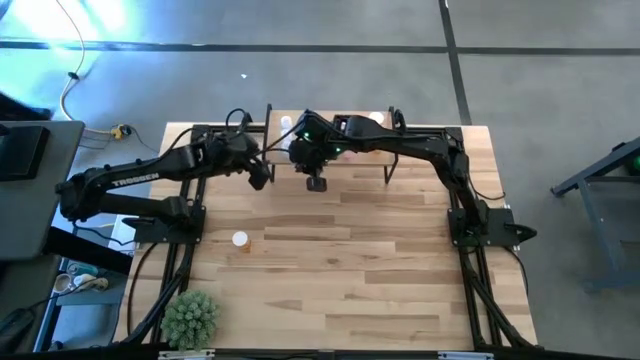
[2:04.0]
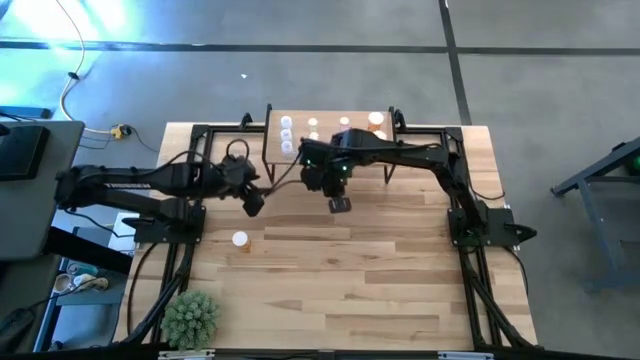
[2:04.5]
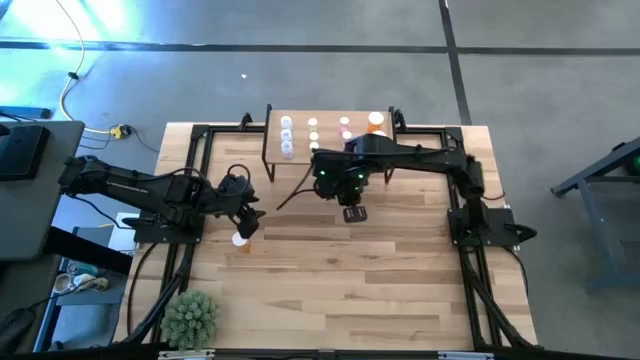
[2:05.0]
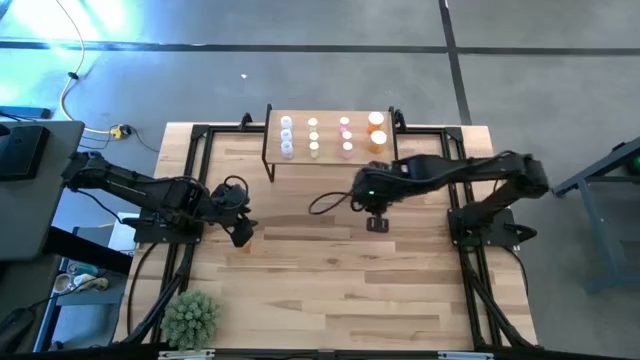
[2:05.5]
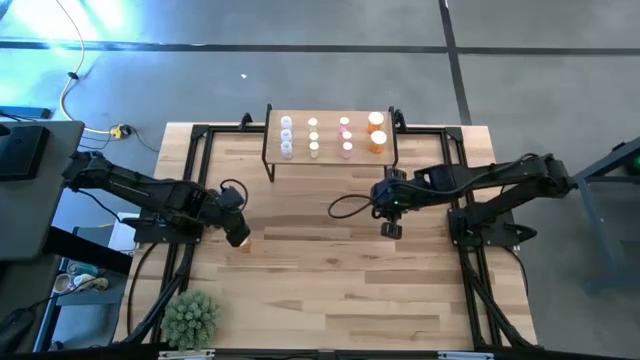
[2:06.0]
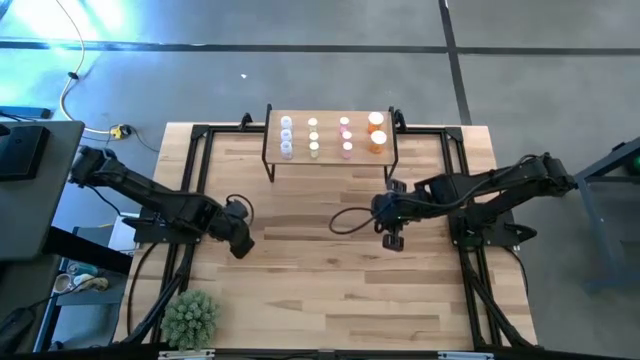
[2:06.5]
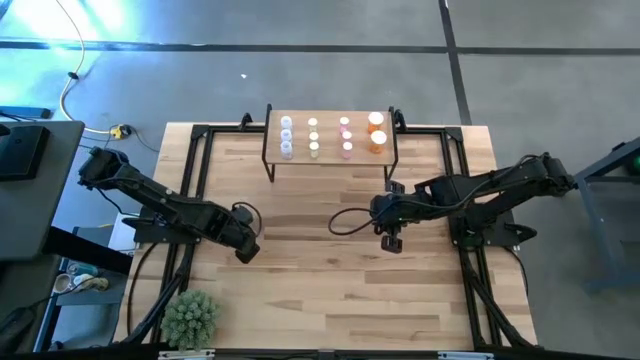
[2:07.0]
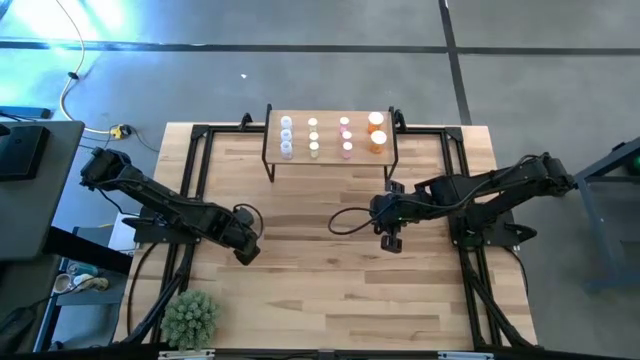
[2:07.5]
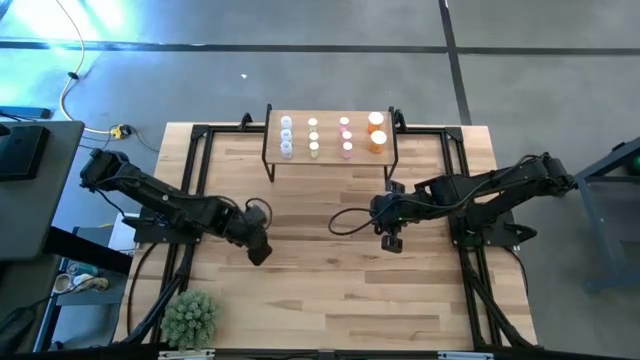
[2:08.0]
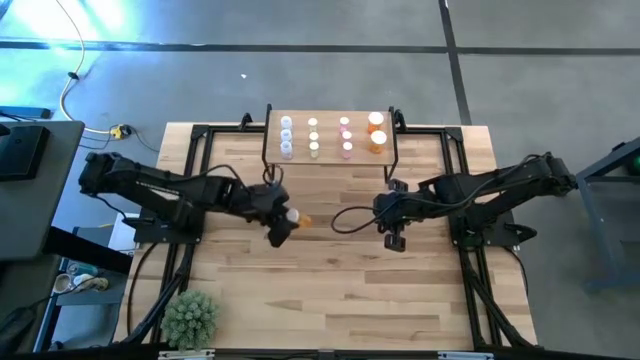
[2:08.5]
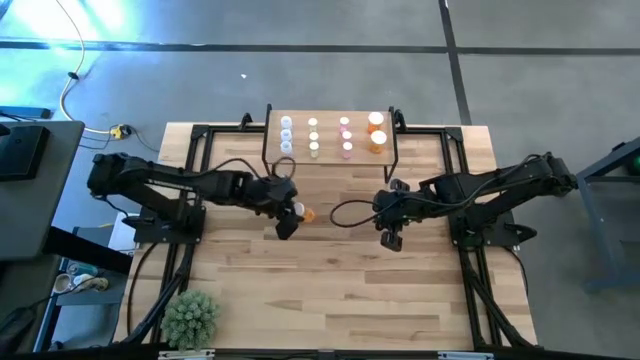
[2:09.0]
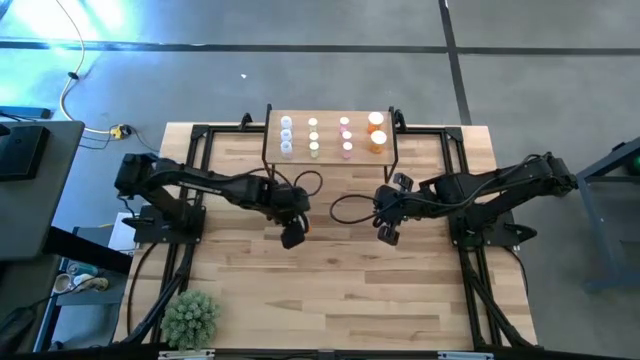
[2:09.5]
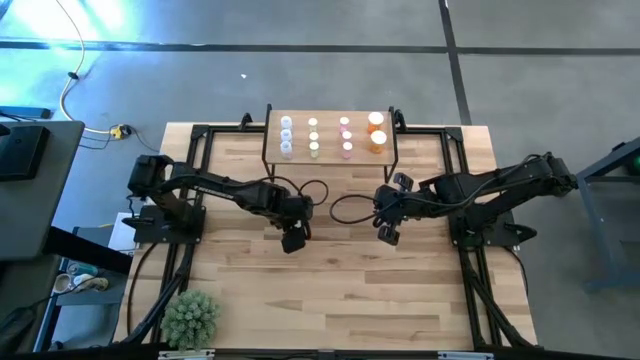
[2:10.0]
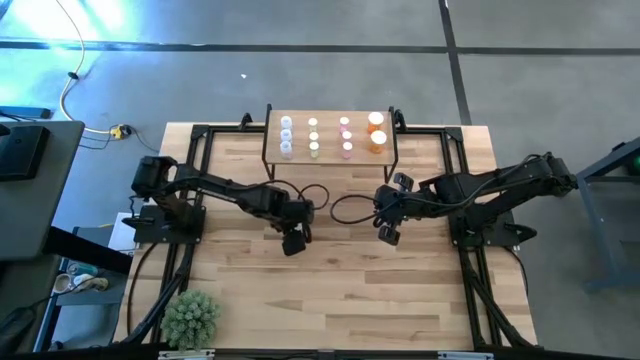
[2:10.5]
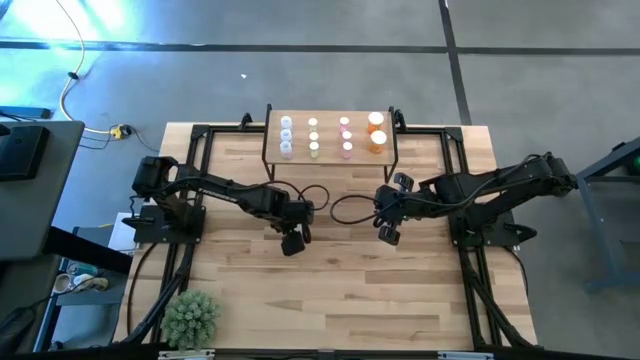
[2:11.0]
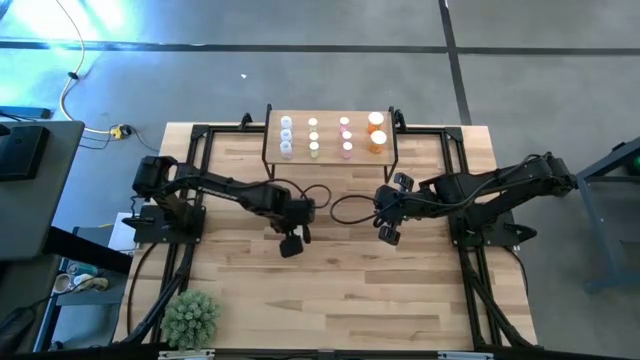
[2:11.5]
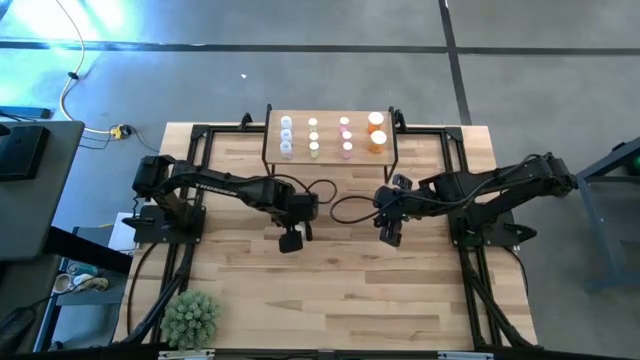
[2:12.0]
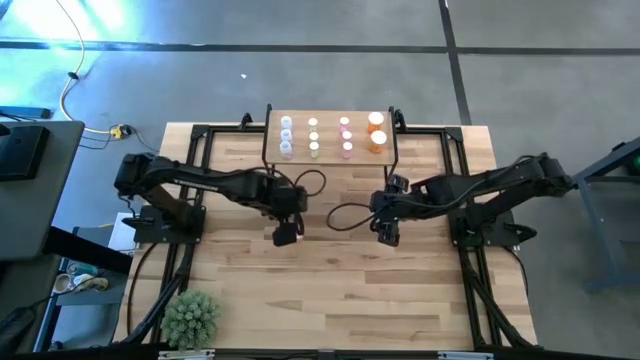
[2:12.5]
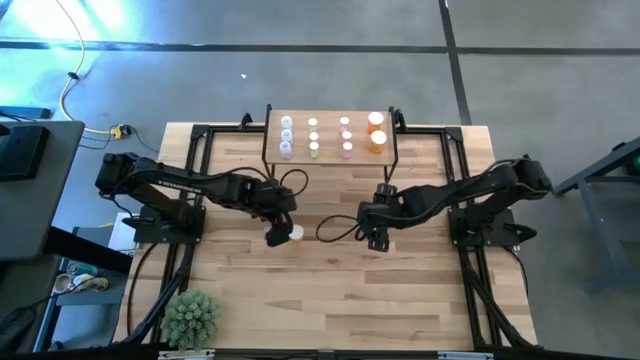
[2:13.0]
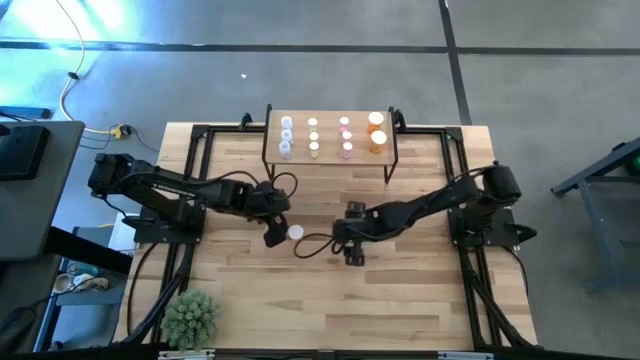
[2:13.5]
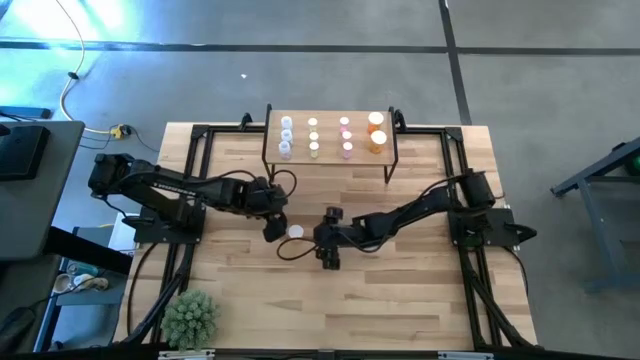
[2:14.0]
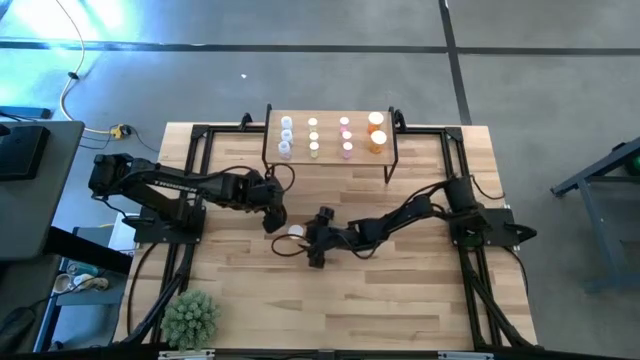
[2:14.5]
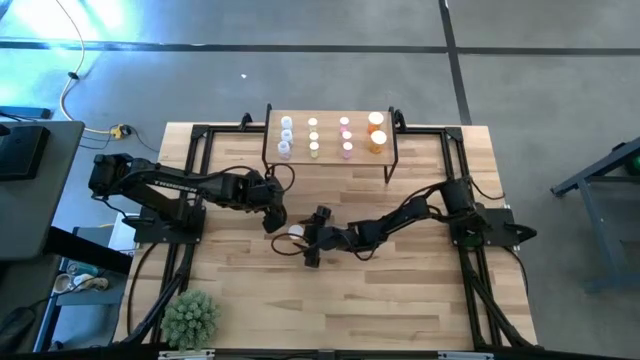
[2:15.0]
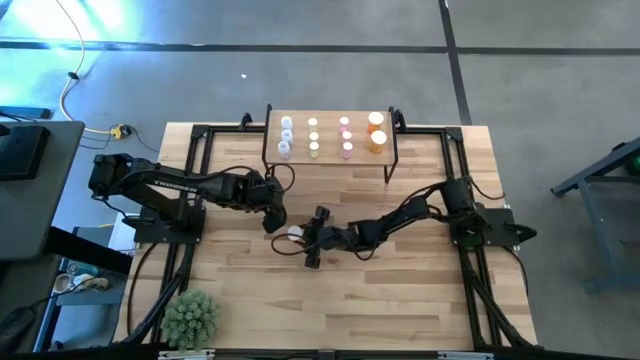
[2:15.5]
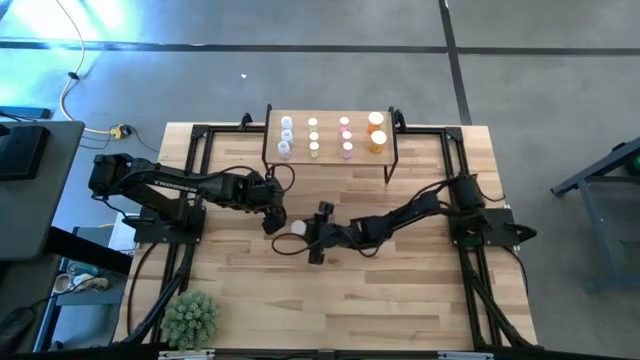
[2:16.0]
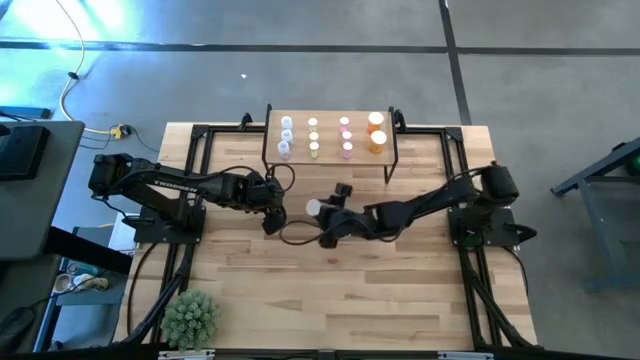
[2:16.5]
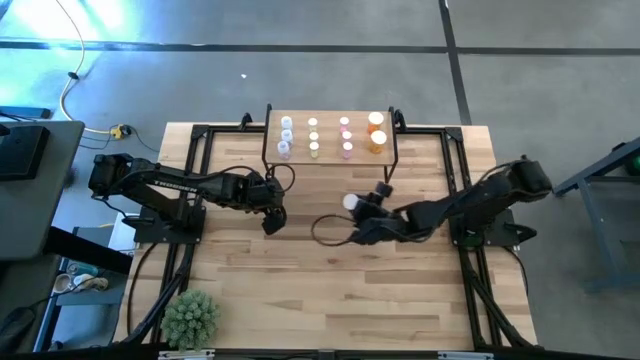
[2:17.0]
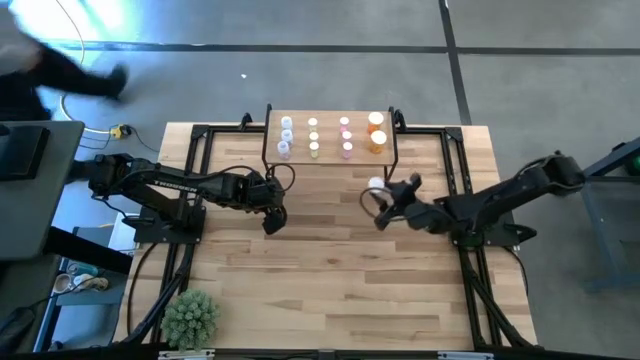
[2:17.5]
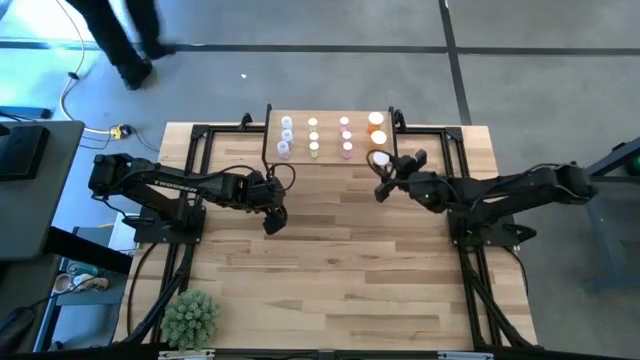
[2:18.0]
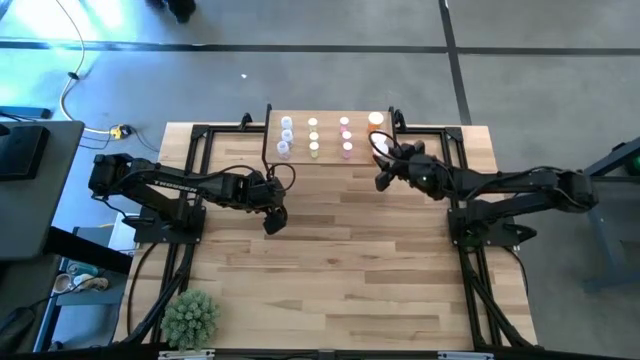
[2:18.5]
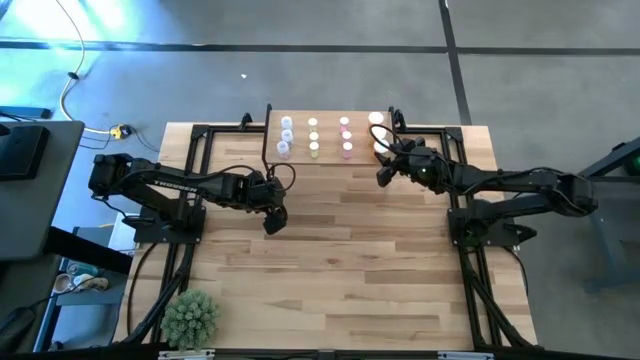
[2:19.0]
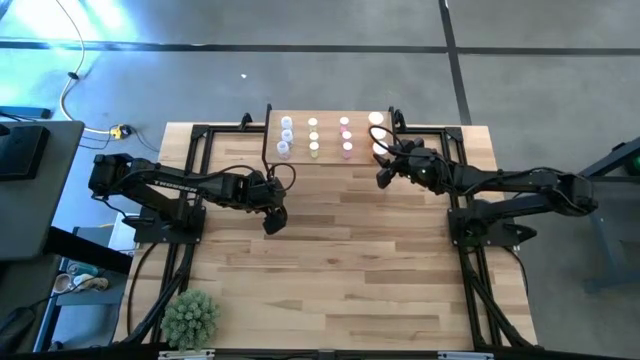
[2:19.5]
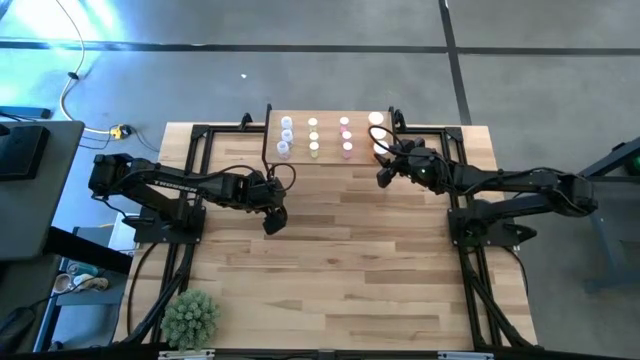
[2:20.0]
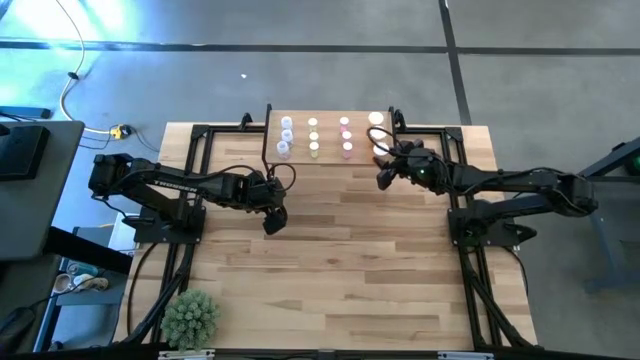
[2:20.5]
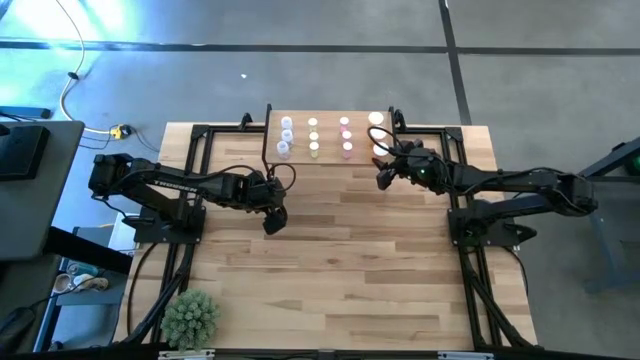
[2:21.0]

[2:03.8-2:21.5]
Task: Pick and place medicine bottles onto shelf by color
Put the orange pill bottle on the shelf aligned with the orange pill bottle

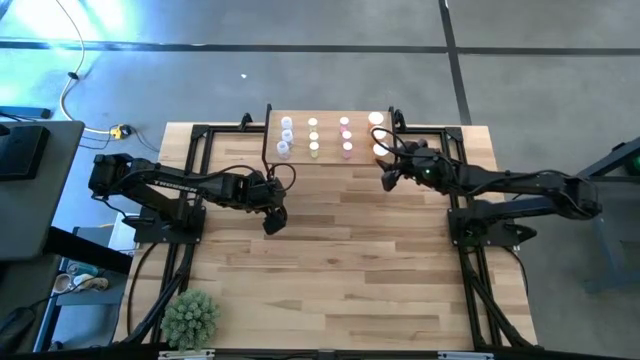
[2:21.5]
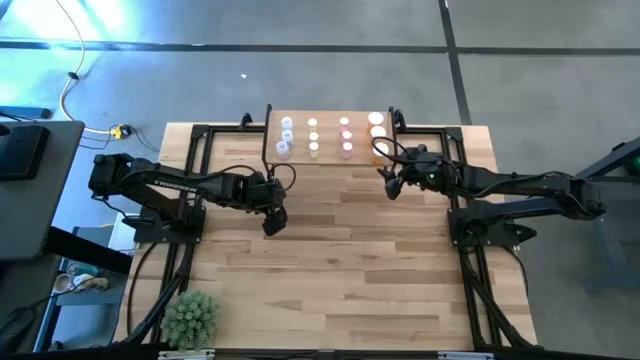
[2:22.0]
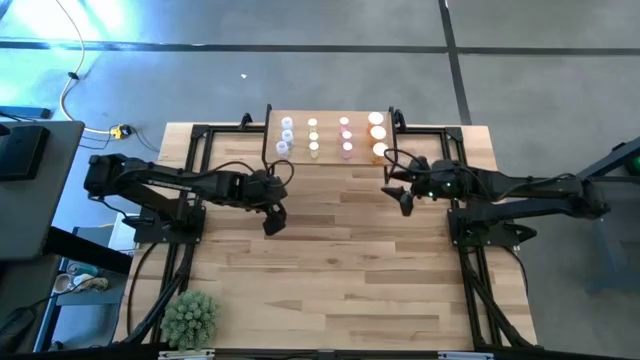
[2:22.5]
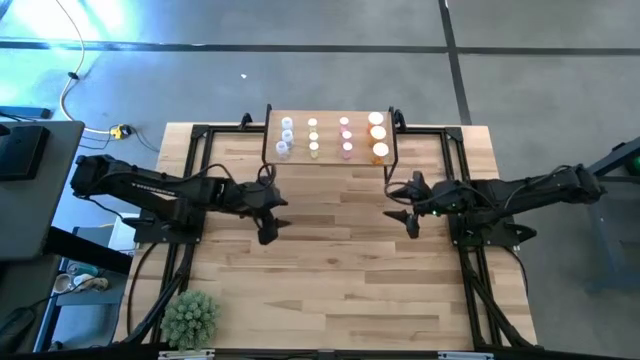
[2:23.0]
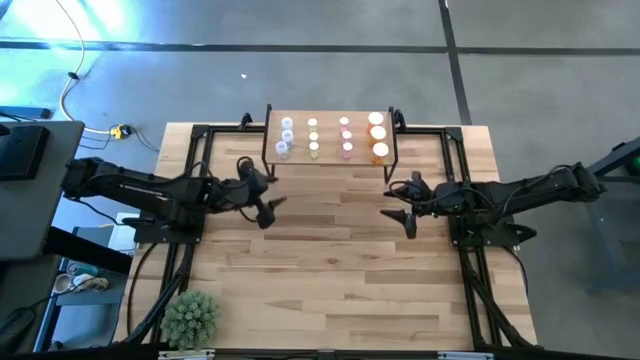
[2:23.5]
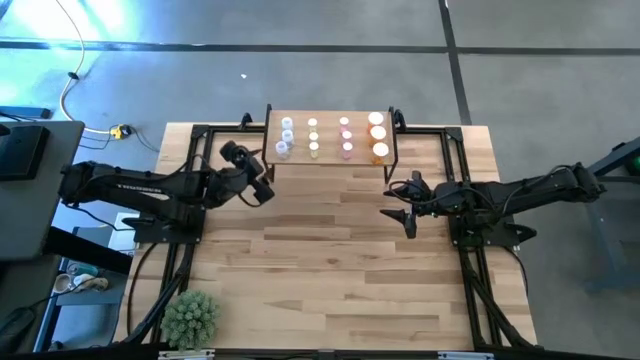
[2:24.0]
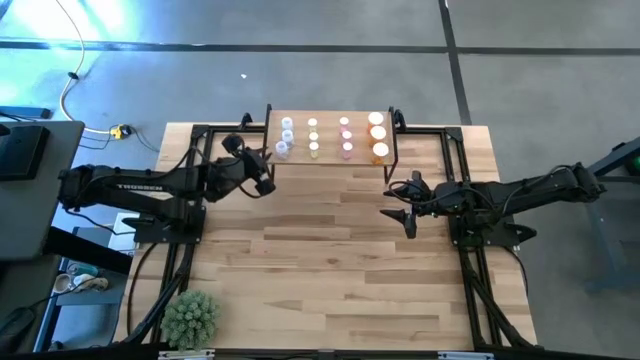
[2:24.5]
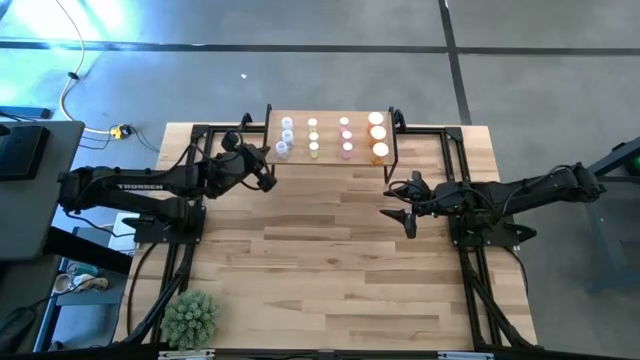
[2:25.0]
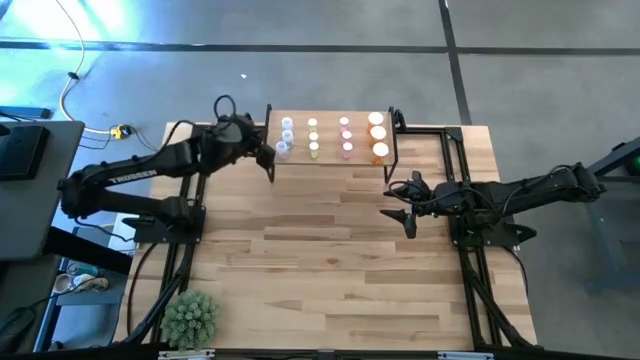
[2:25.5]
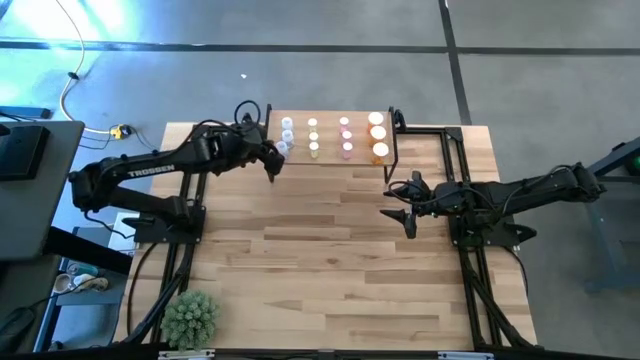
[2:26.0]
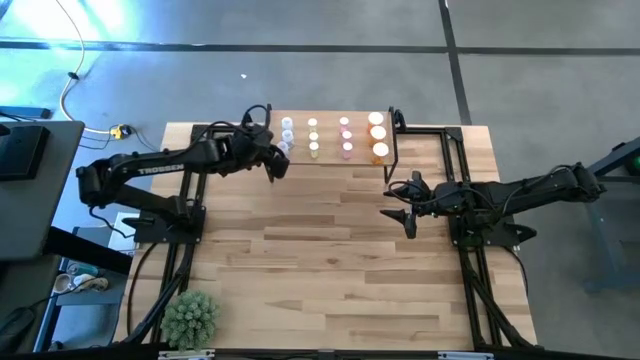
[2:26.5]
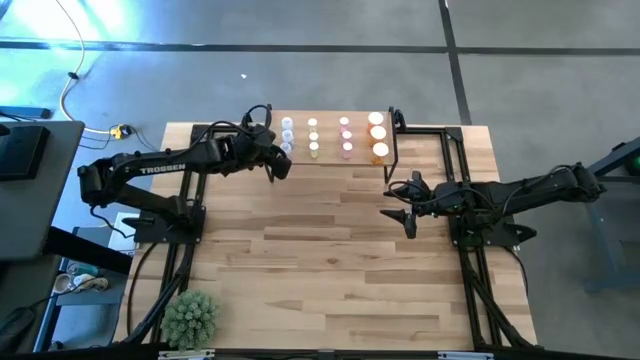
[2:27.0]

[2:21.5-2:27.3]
Adjust the transparent pill bottle on the shelf
